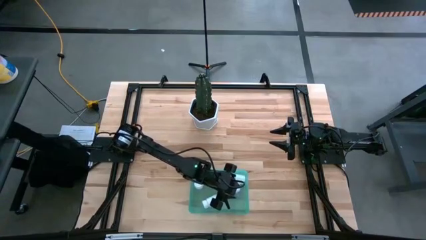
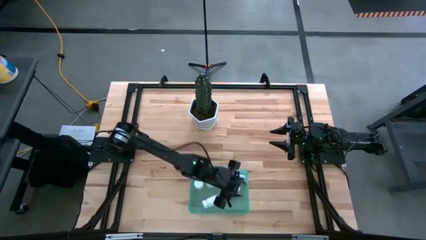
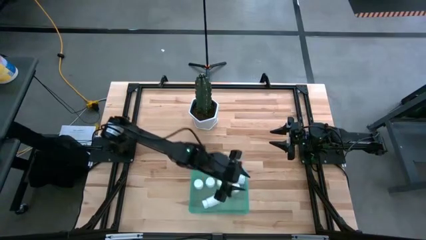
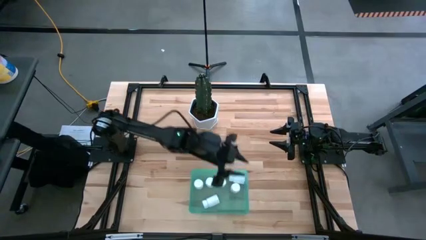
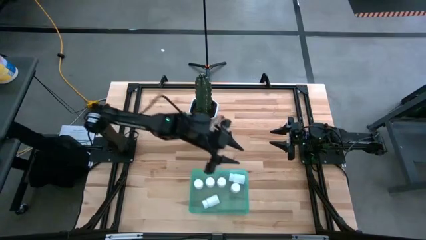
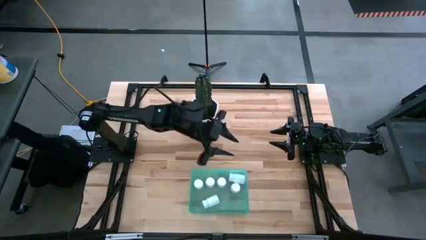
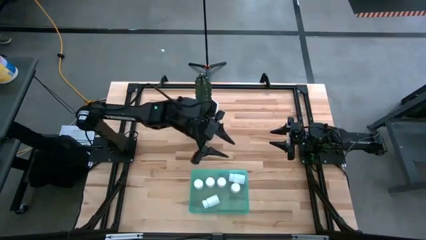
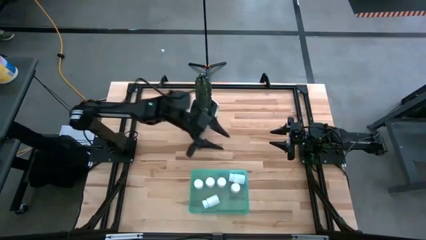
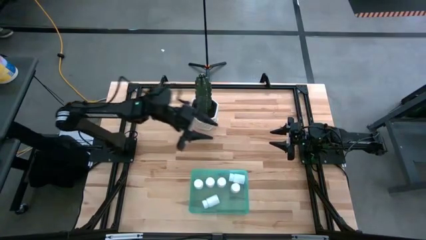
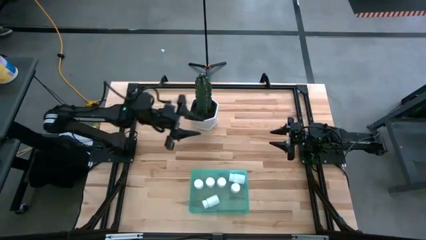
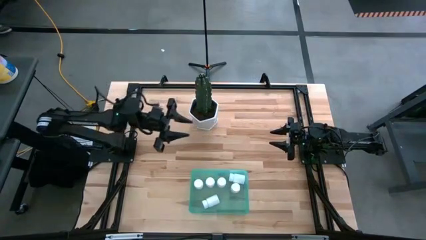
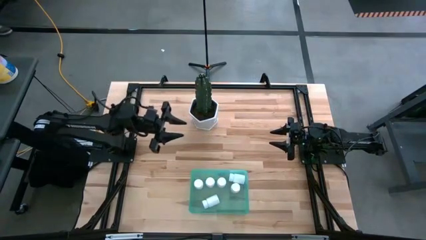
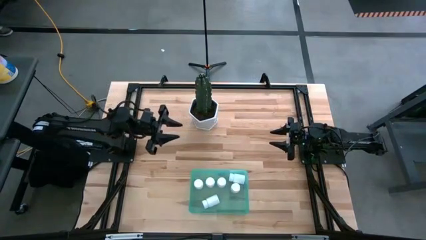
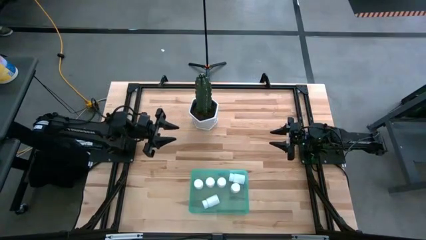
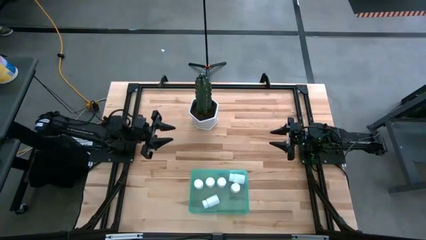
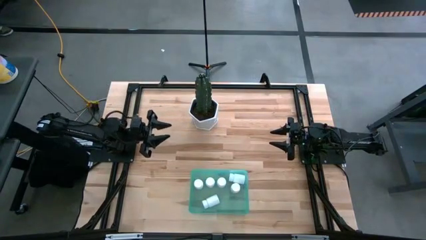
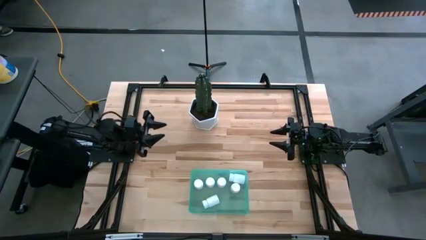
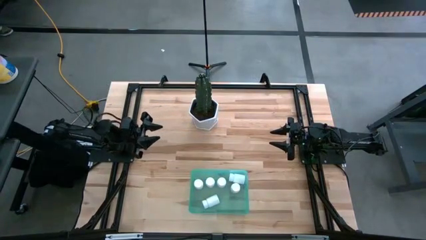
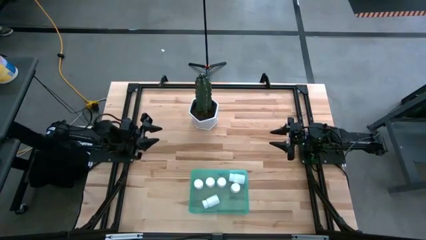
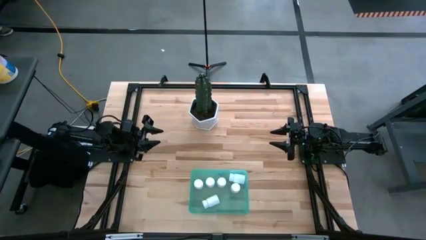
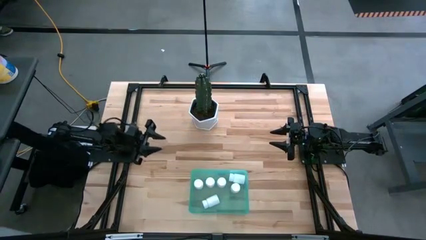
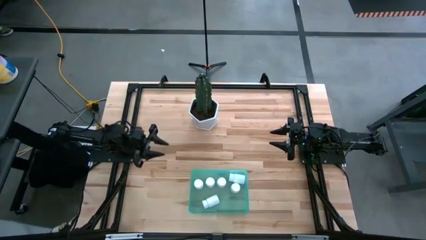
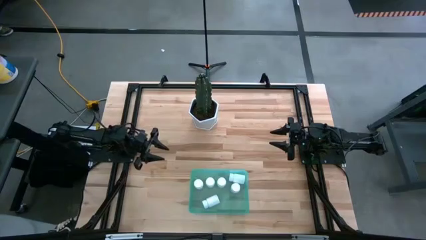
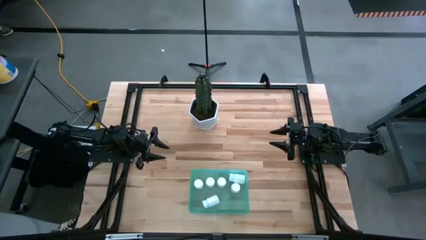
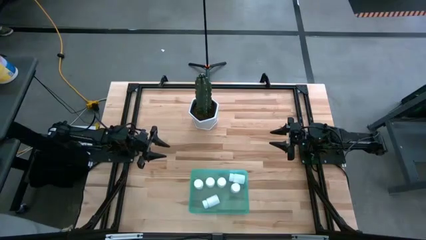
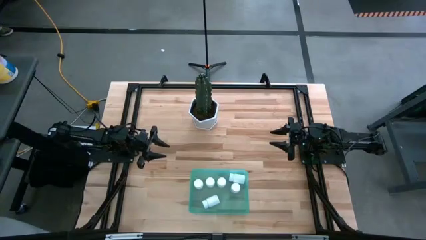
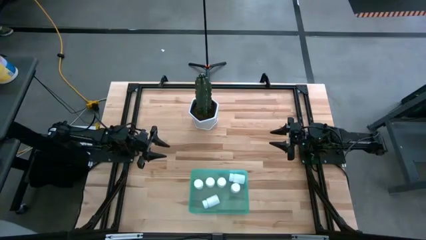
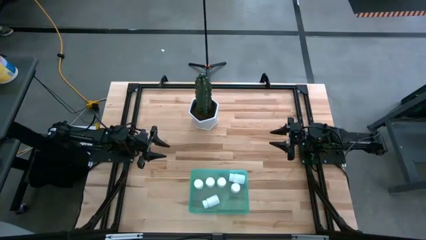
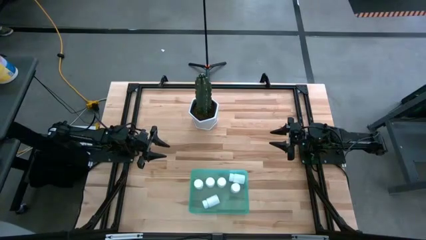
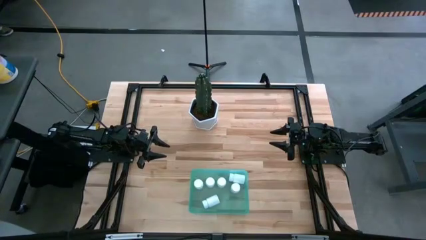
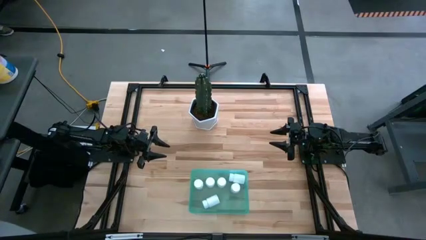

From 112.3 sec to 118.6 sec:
Task: Pick and place pill bottles into a basket
Return to Home Position

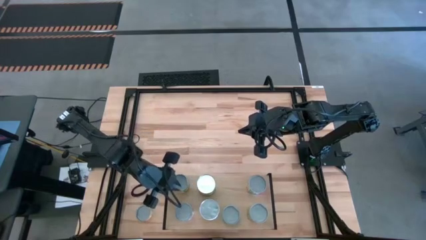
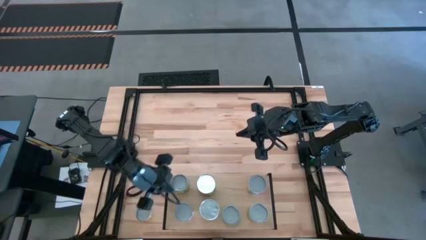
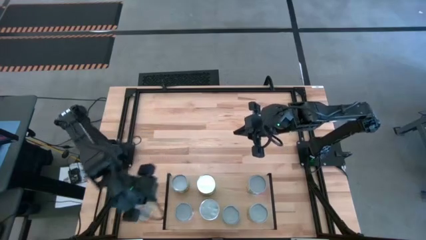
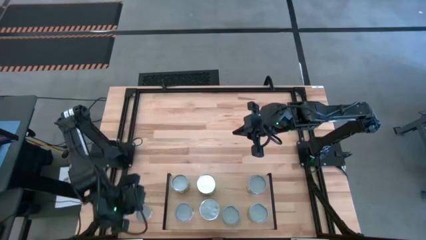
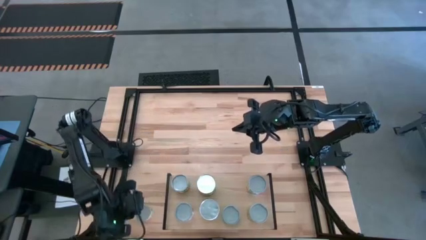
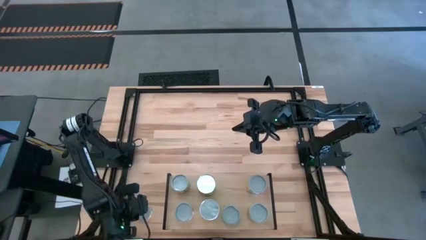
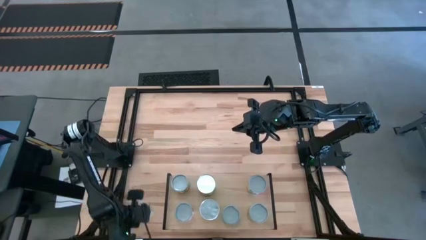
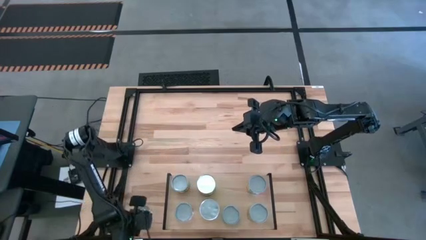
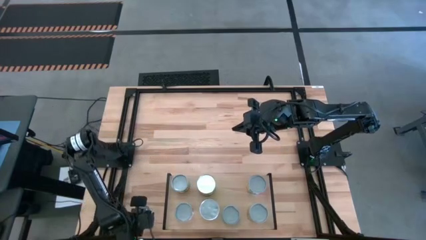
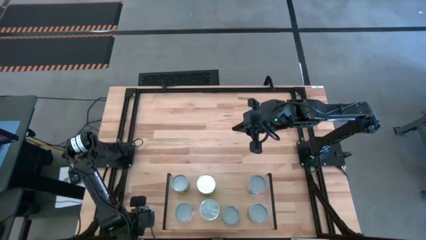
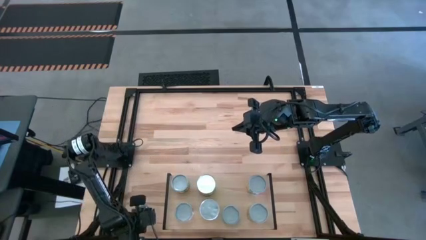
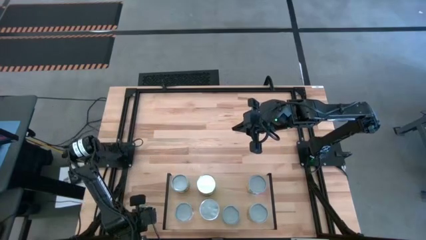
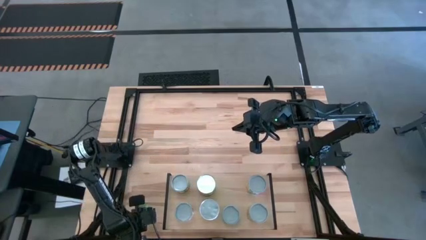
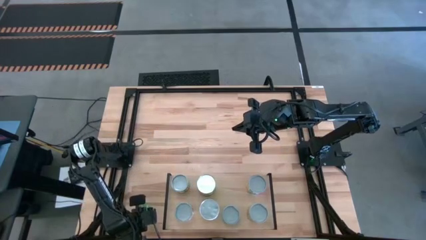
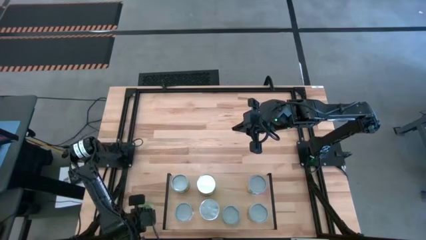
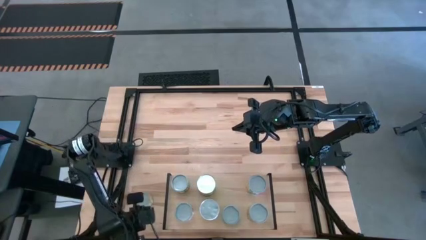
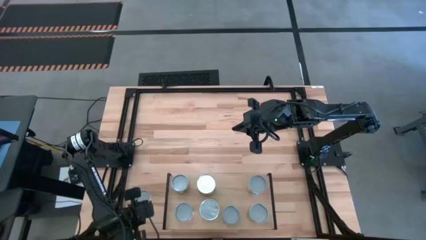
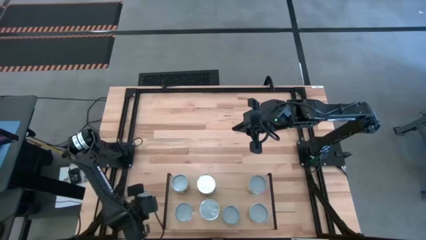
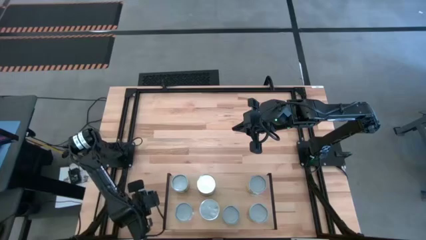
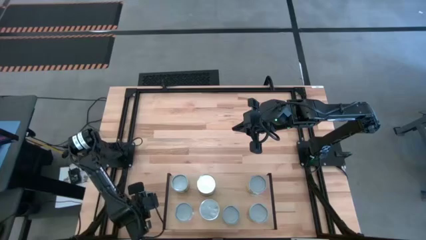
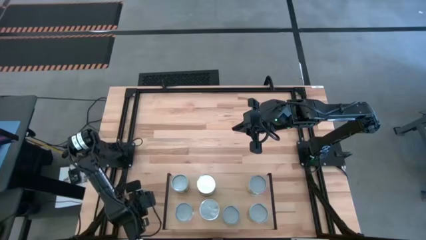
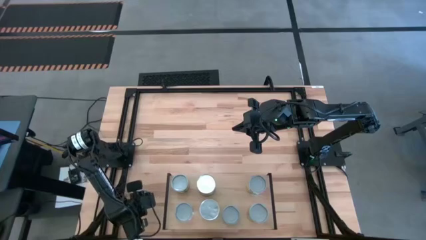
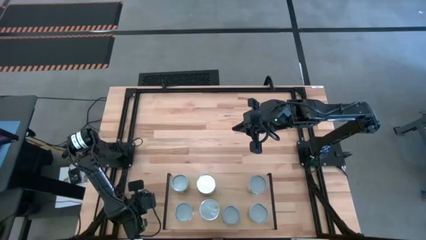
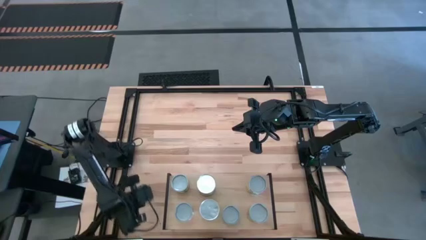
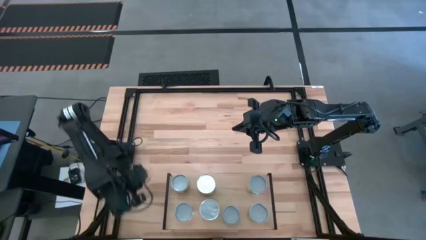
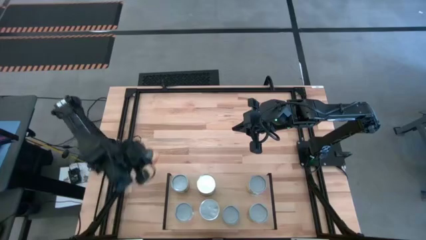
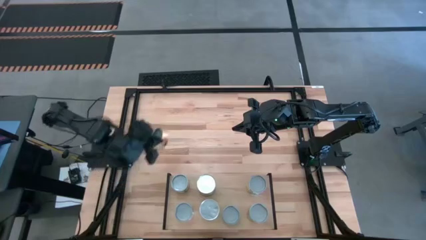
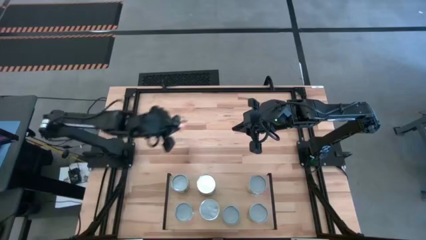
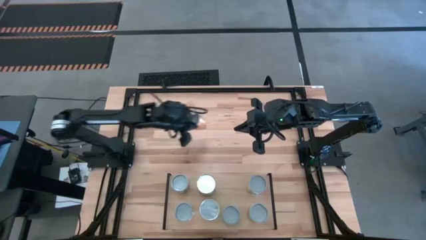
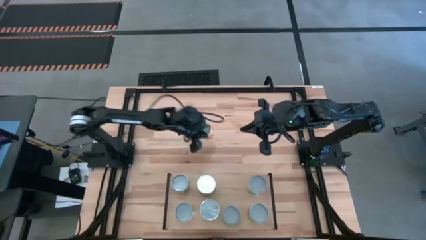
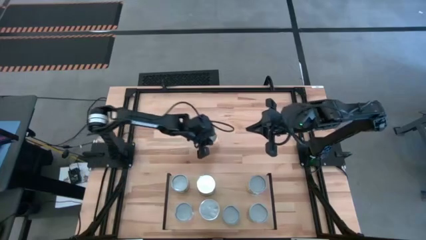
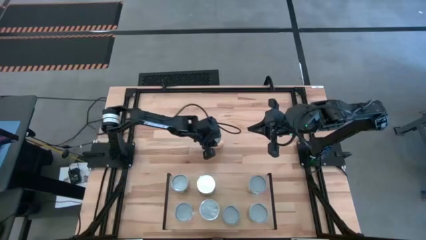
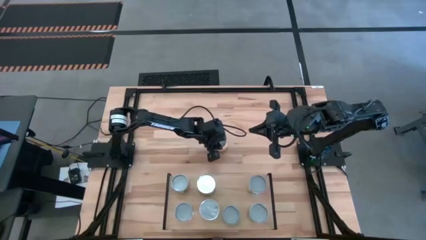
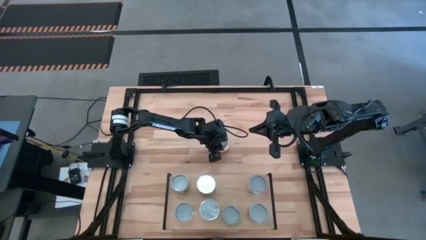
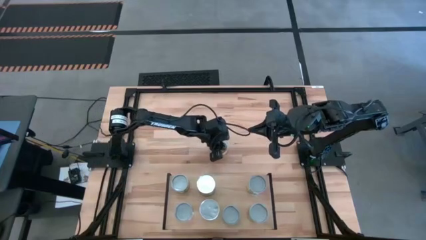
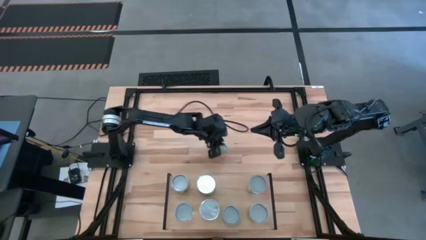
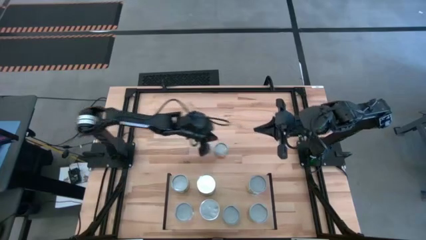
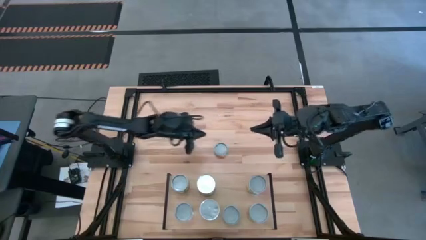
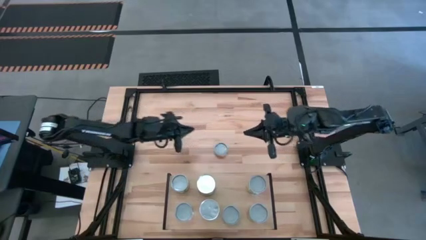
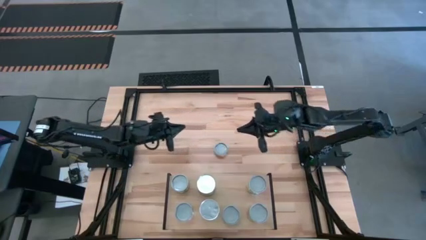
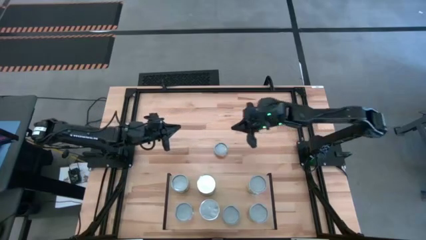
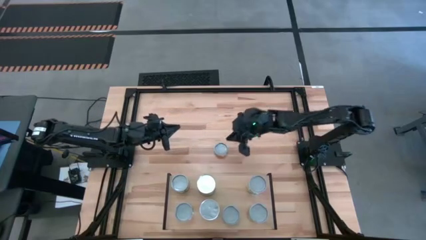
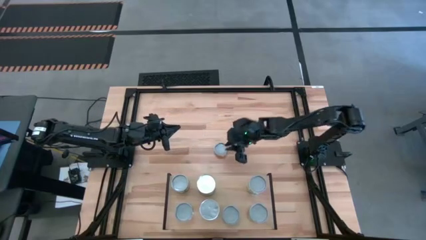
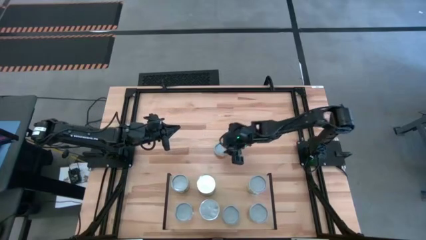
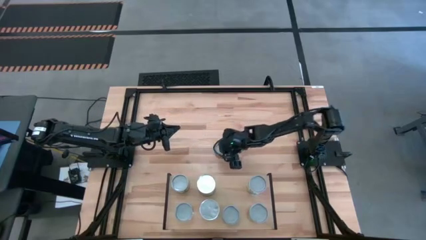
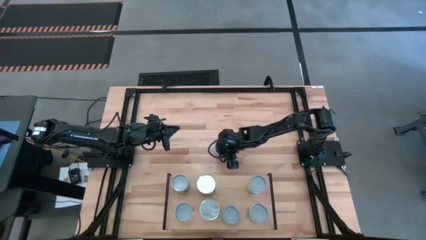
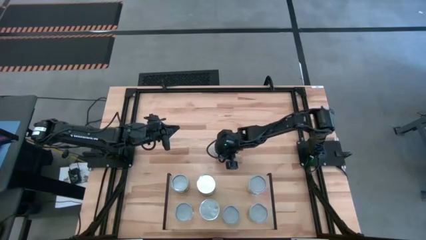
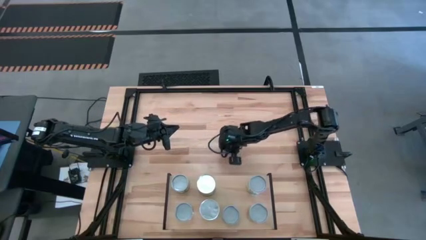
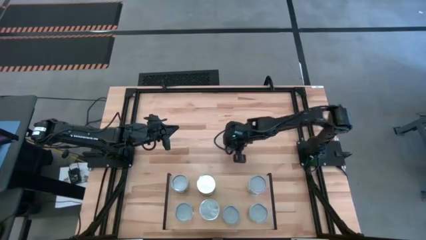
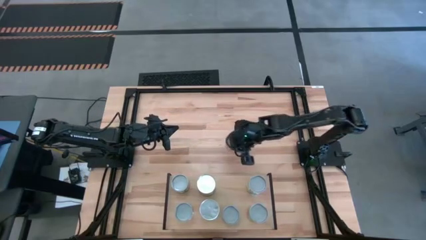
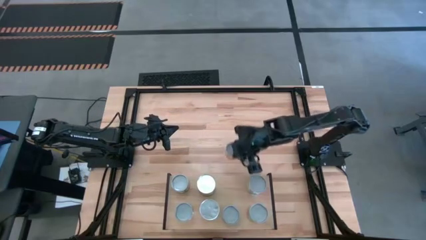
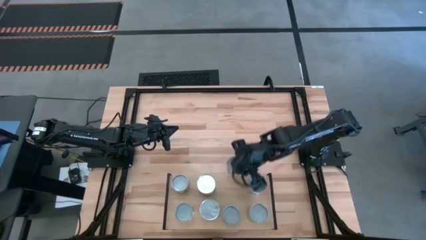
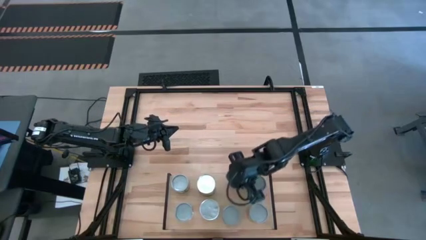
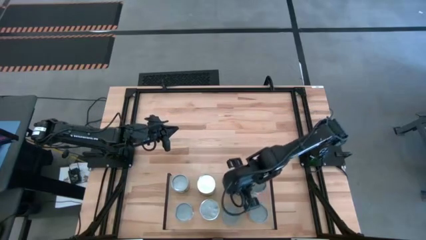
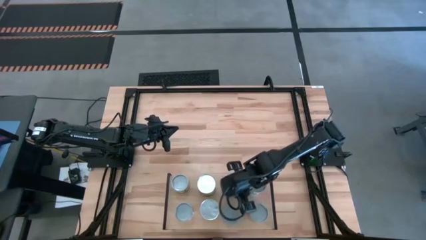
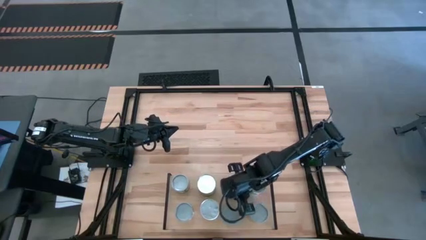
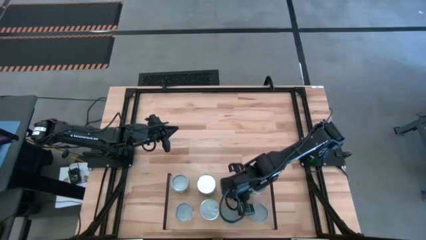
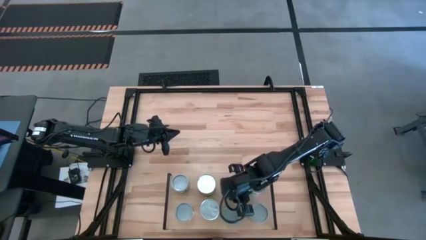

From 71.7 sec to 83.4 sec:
Task: Pick and place cans onto a shelf
Put the canned mushrooms on the shelf
